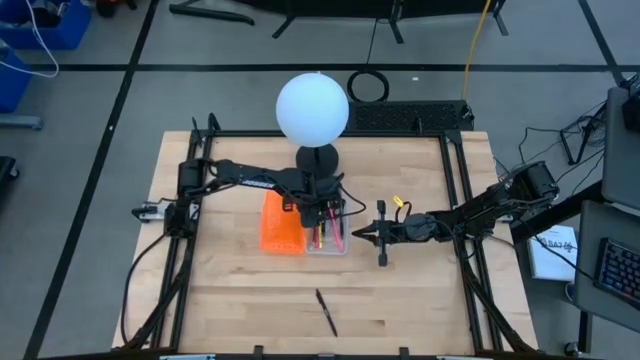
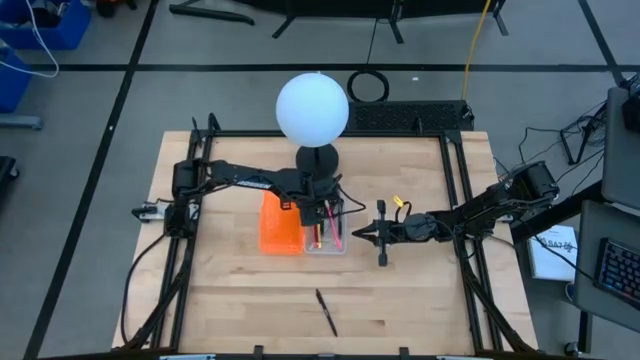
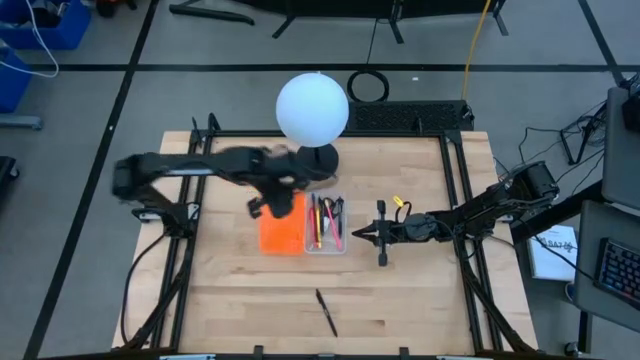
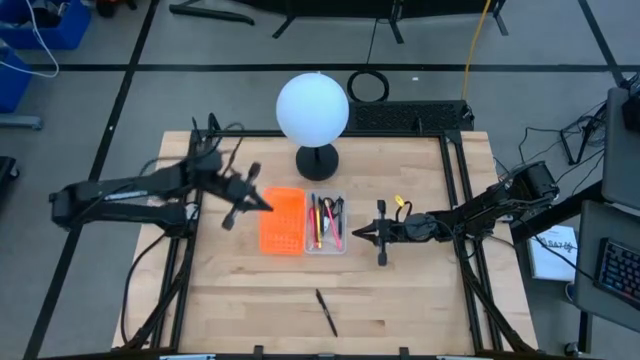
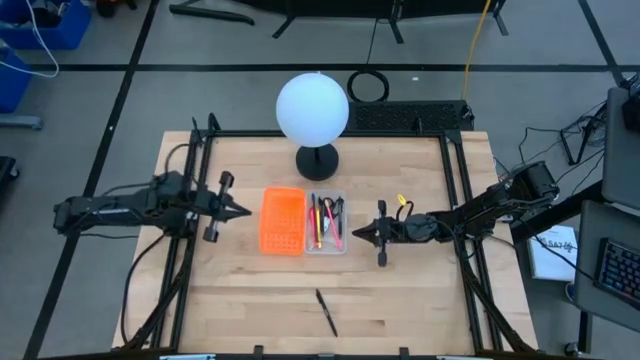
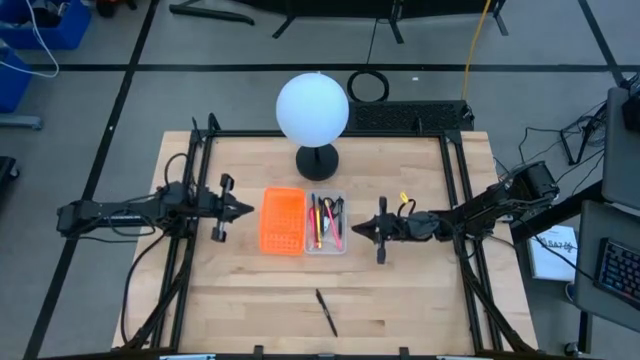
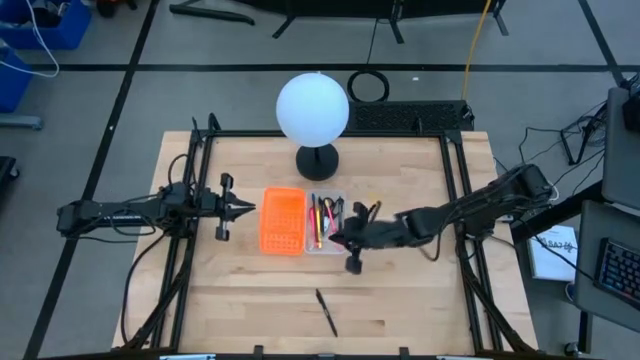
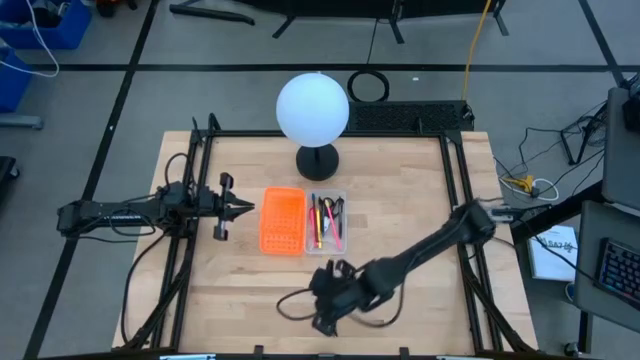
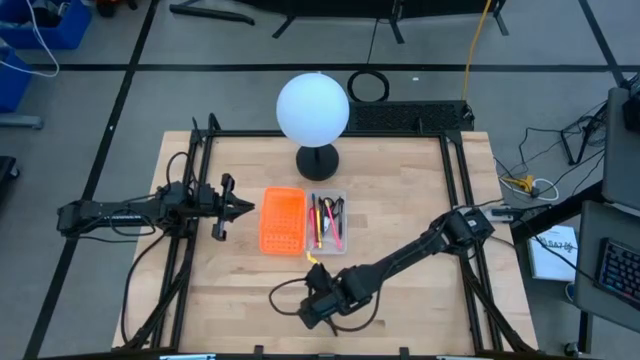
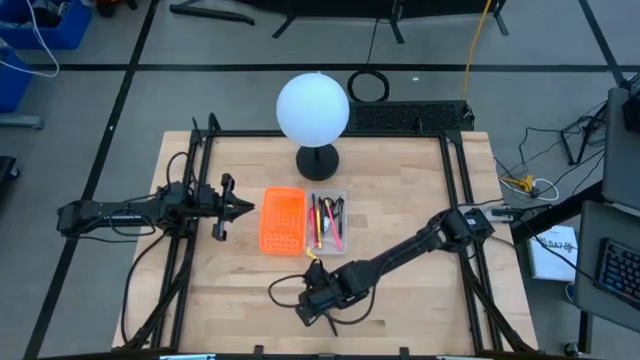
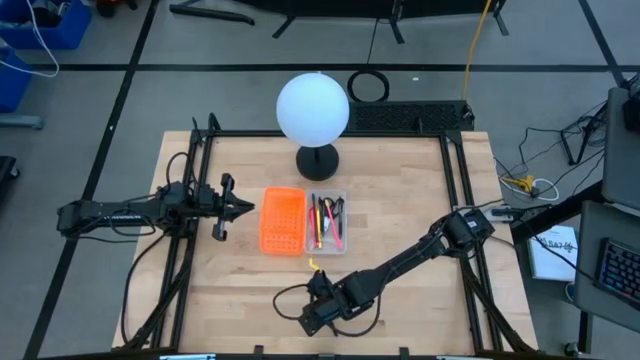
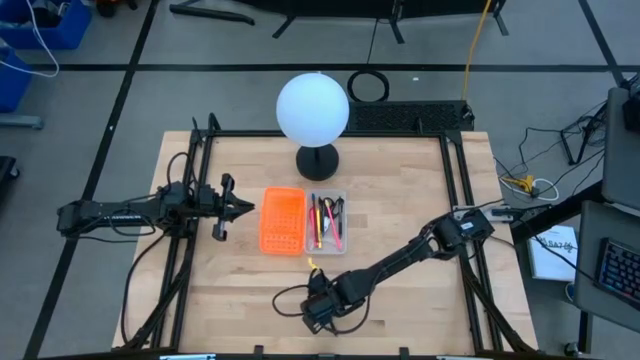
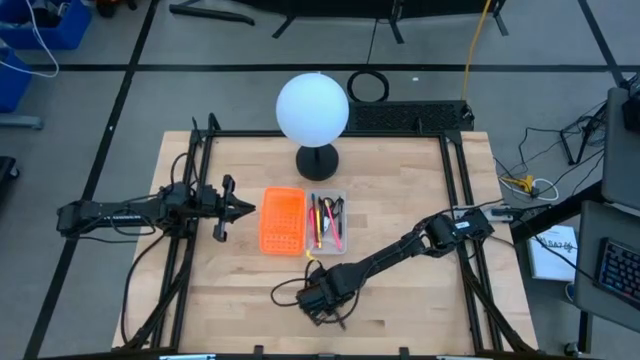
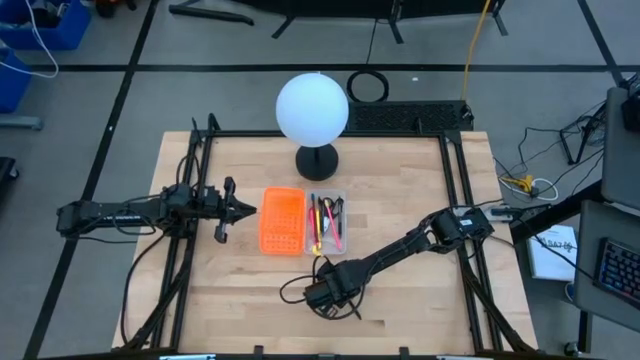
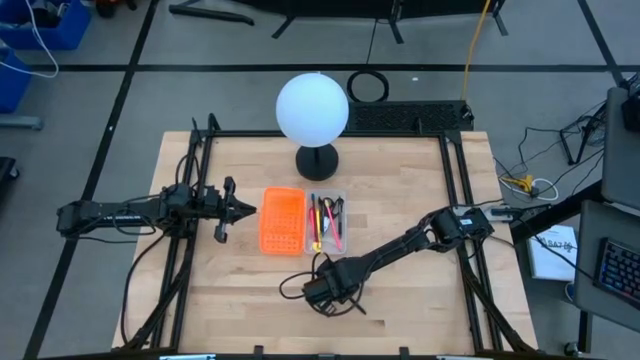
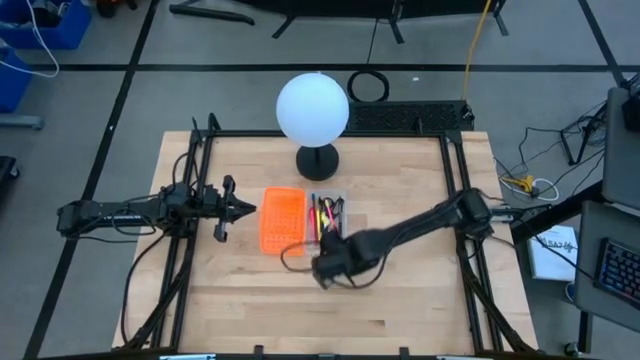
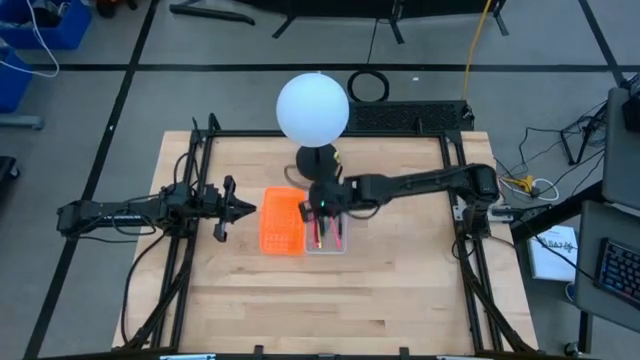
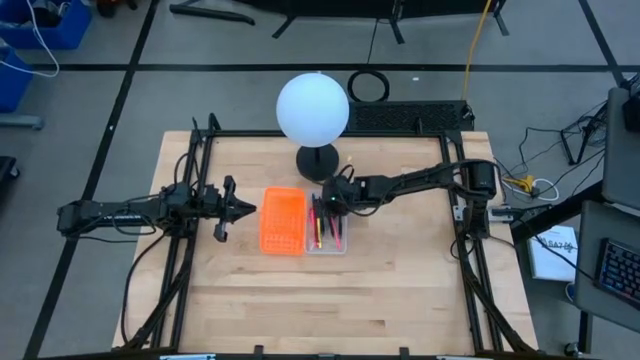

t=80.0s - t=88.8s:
Task: Pick & place school supplies into a supply box
Put the black pen into the orange supply box

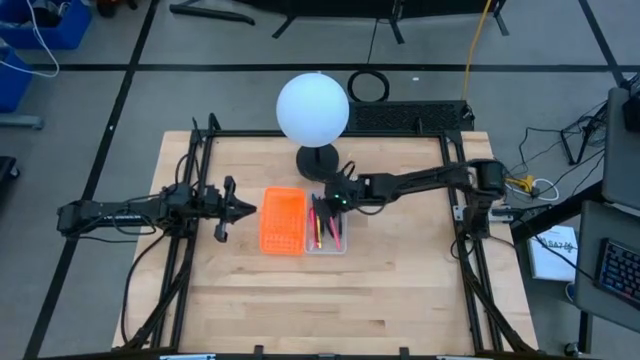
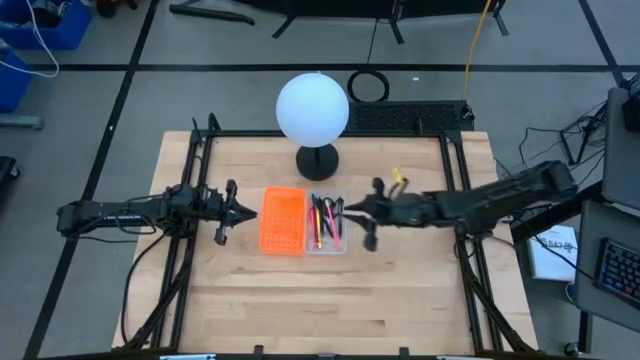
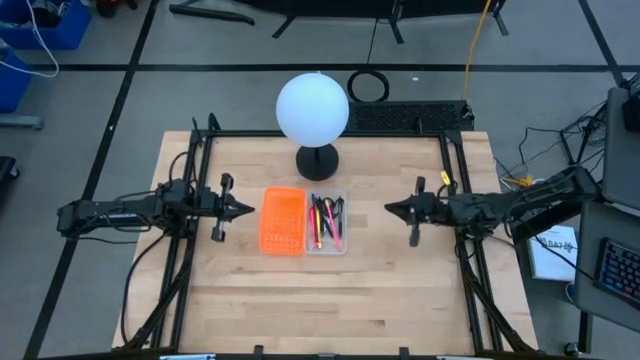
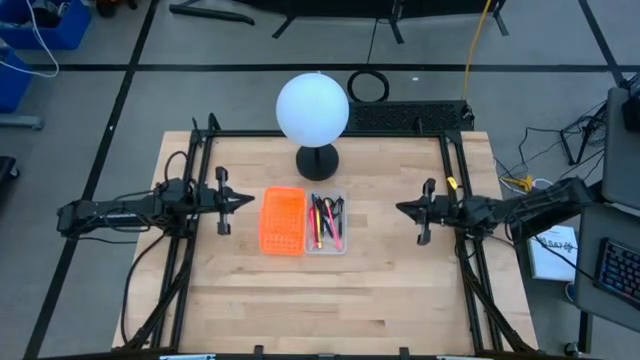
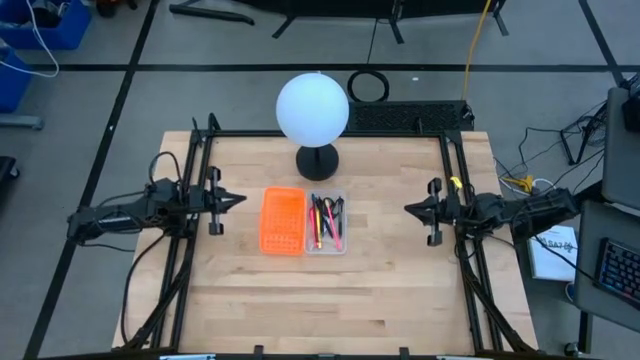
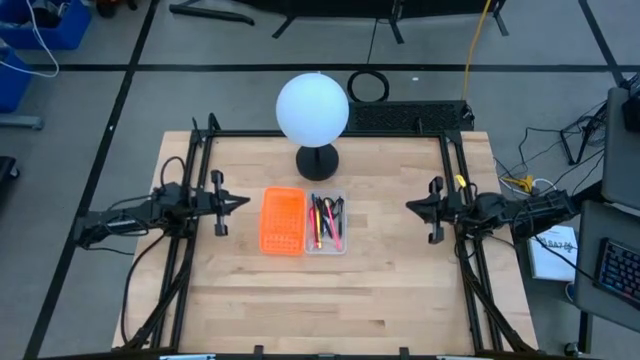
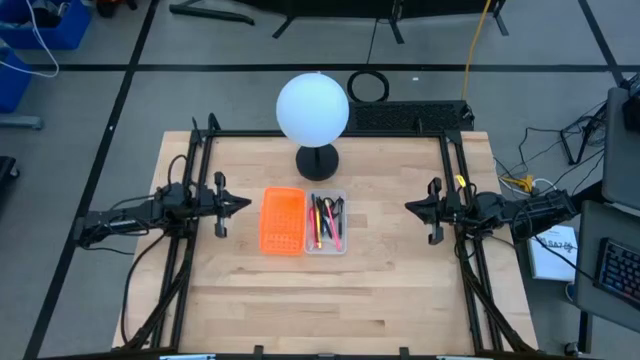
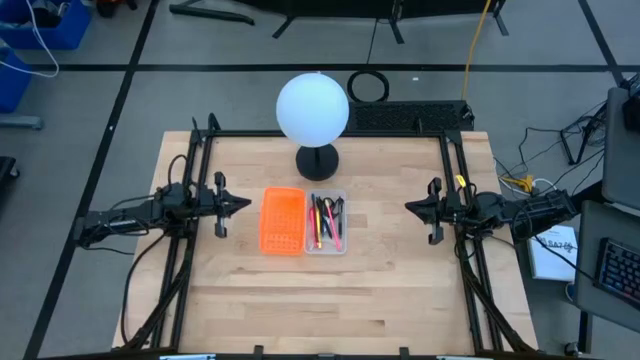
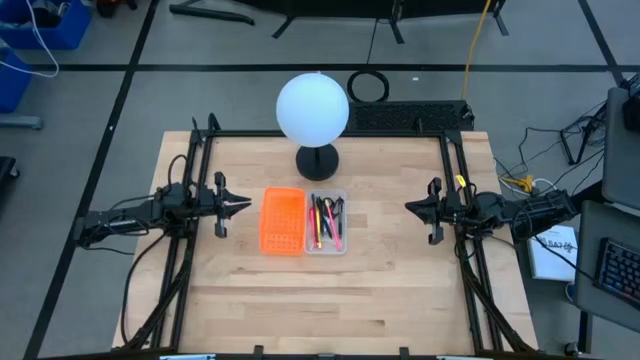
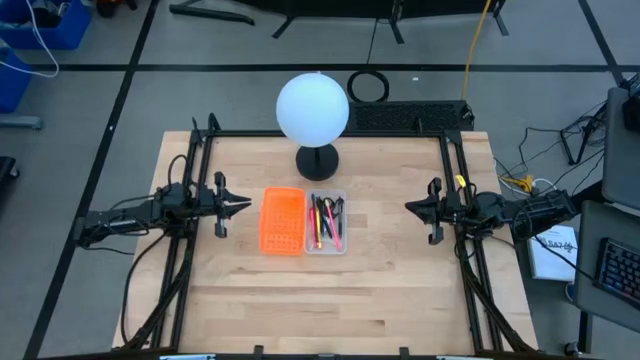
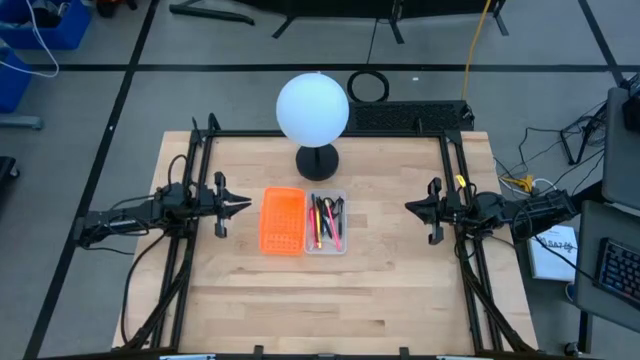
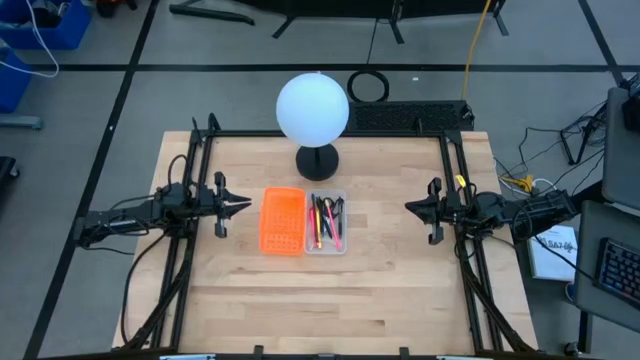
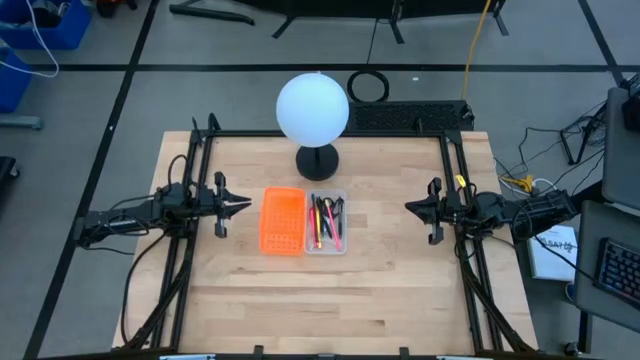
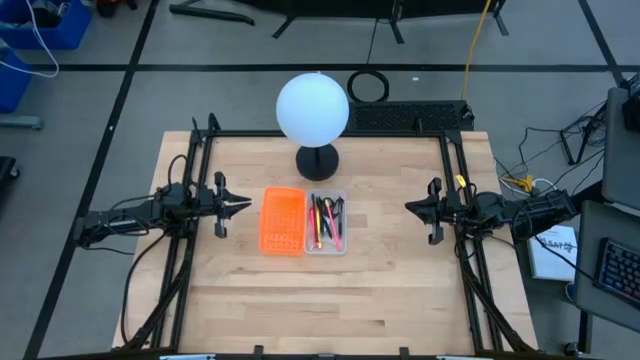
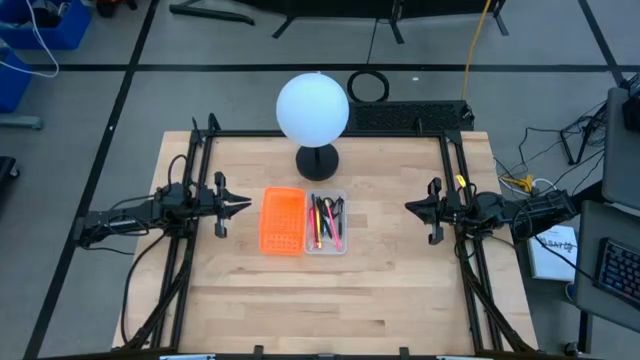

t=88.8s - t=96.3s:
Return to Home Position

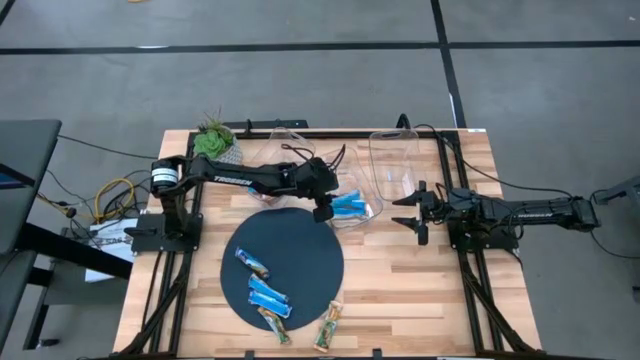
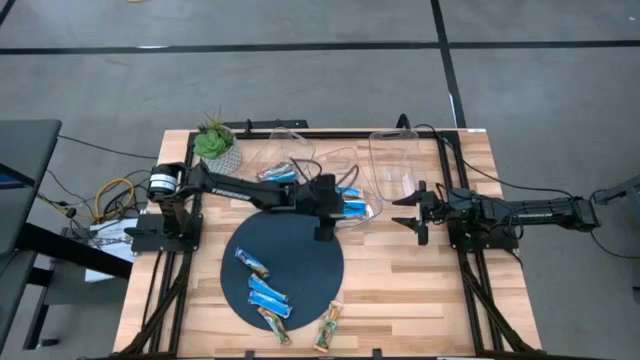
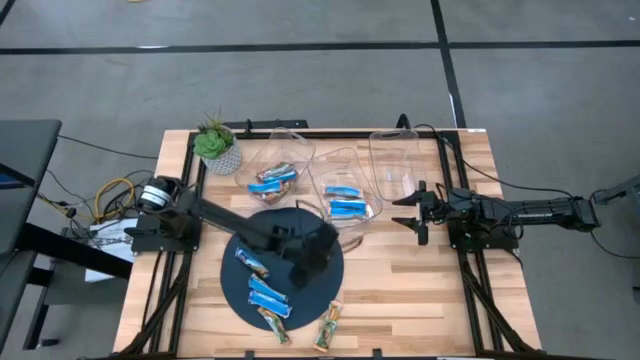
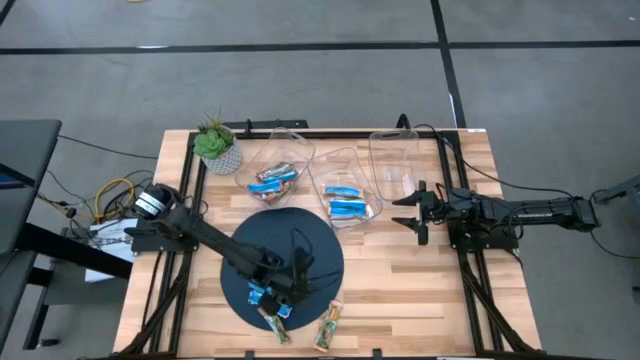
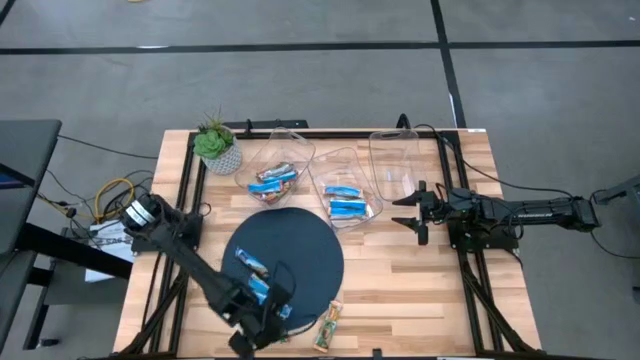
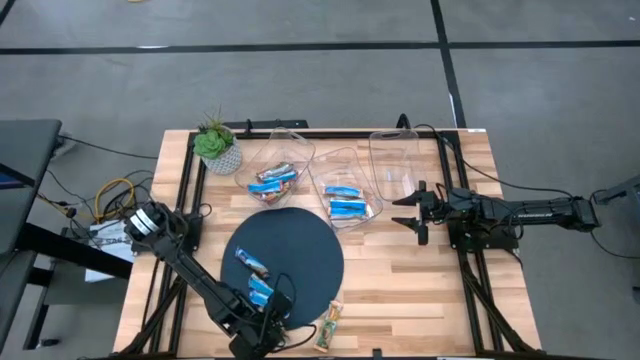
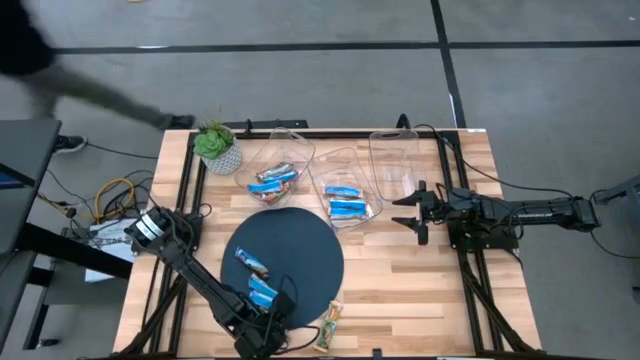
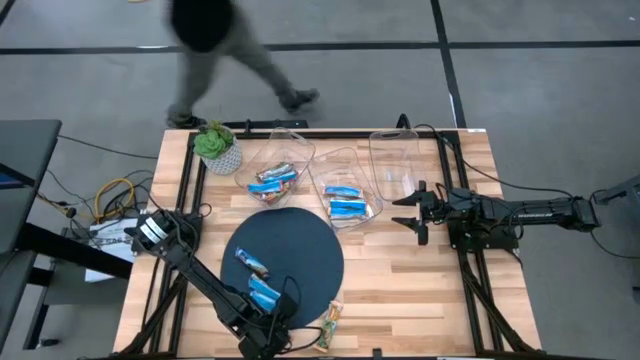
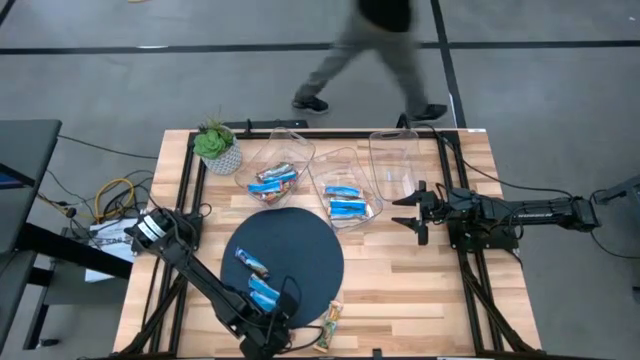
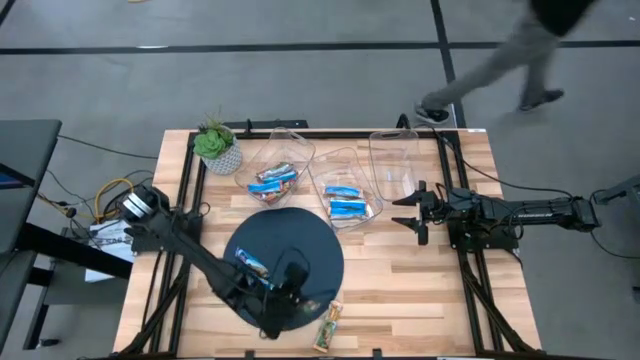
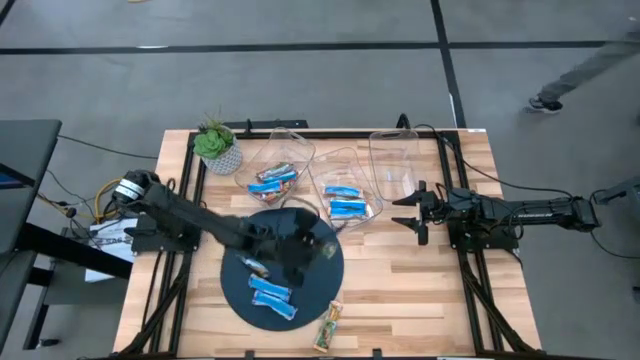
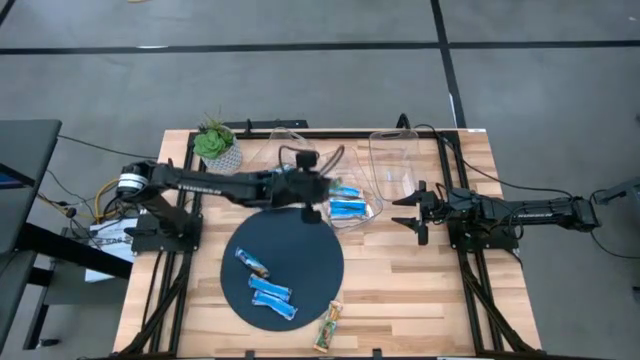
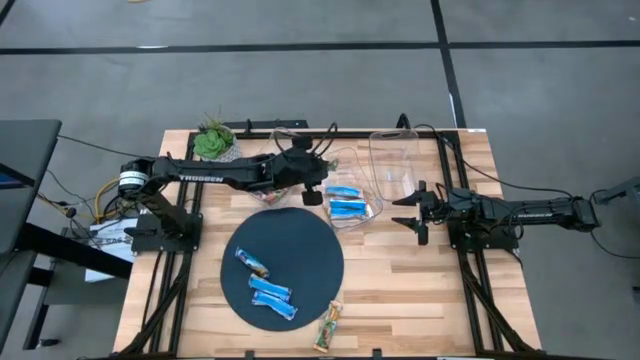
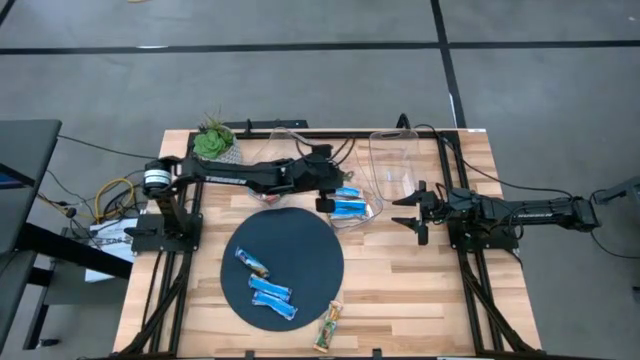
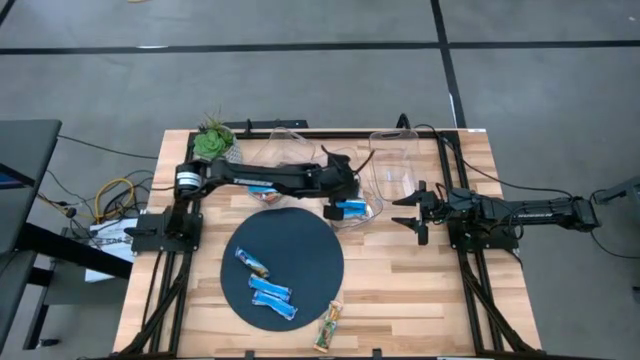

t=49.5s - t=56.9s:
Task: Pick and place Granola Bars by type
Put the yellow granola bar into the middle transparent bin
